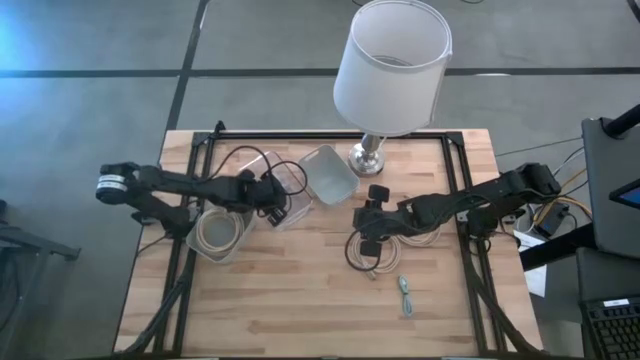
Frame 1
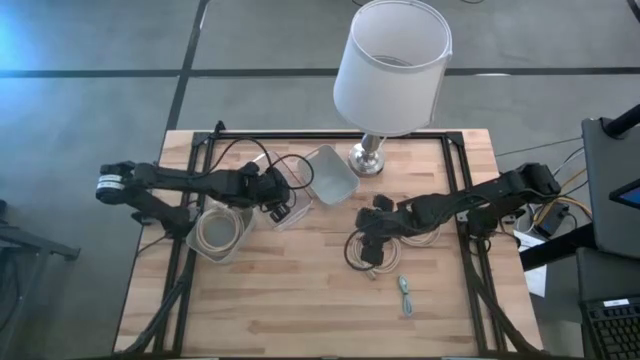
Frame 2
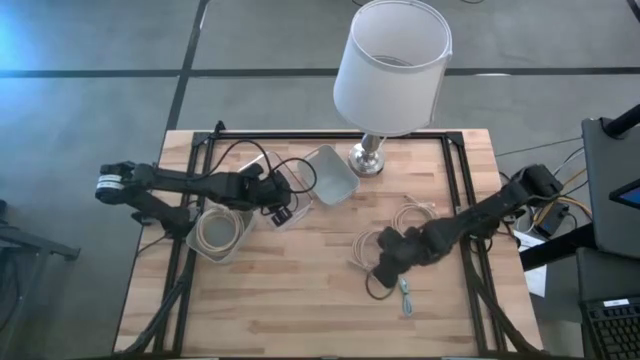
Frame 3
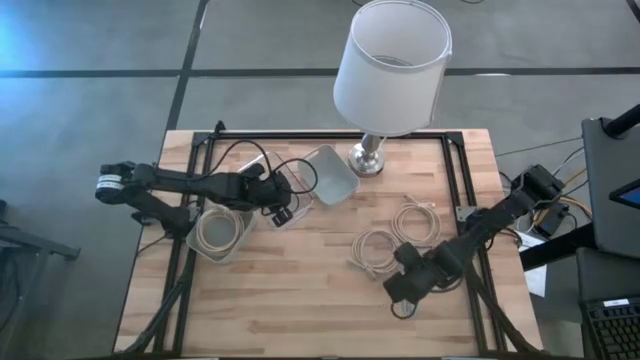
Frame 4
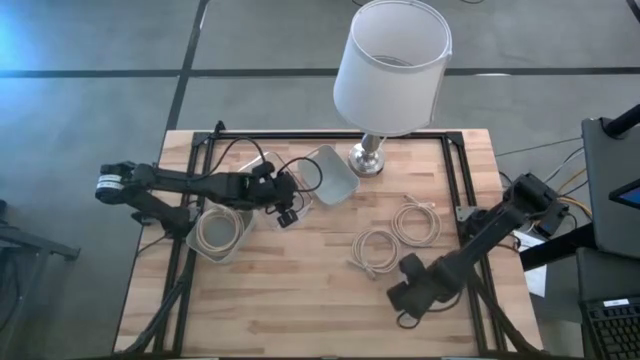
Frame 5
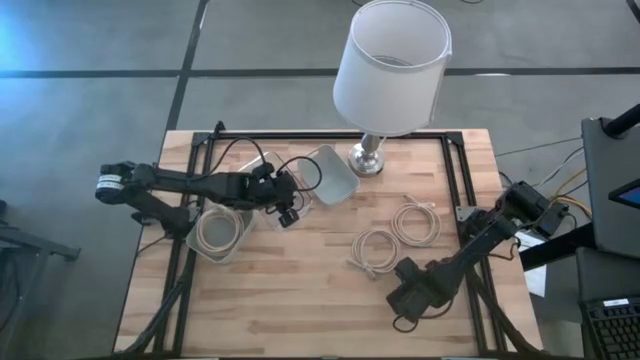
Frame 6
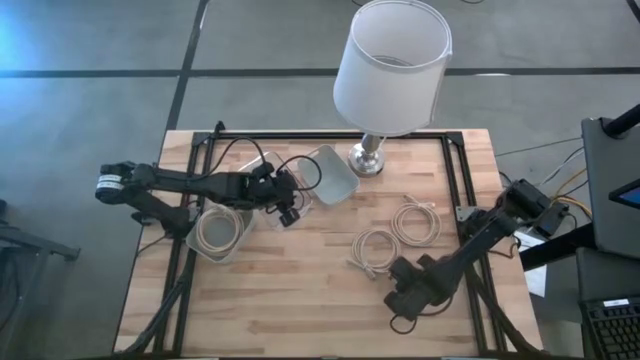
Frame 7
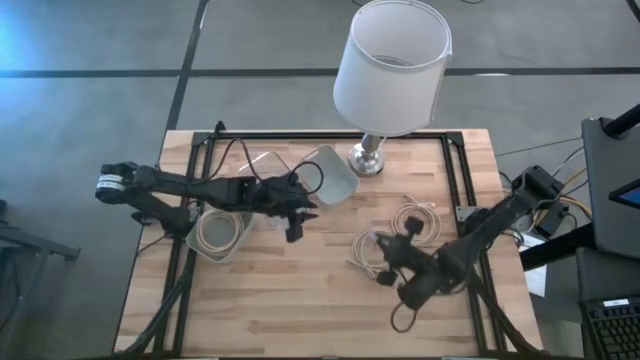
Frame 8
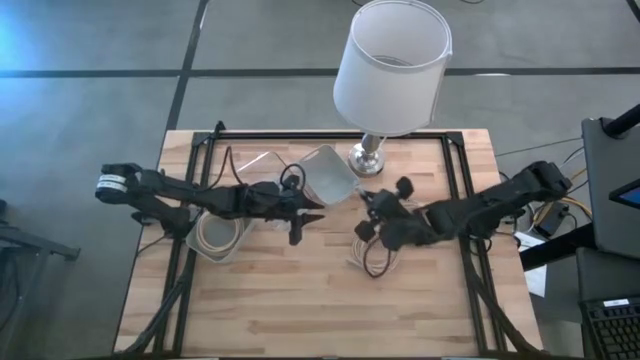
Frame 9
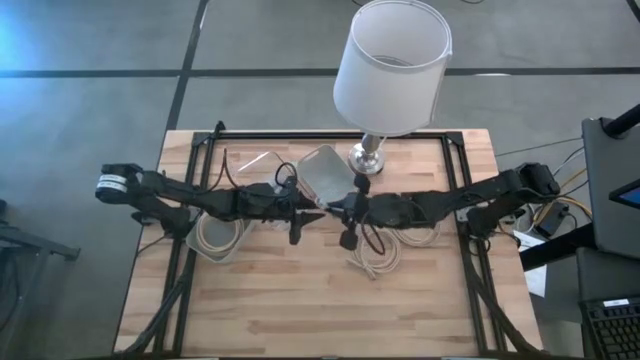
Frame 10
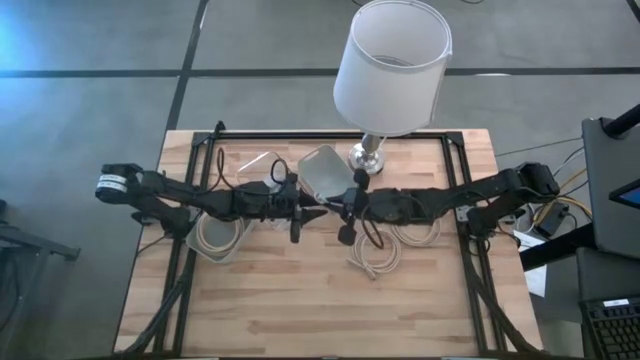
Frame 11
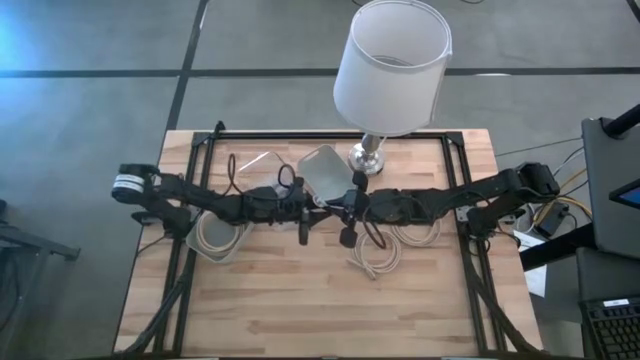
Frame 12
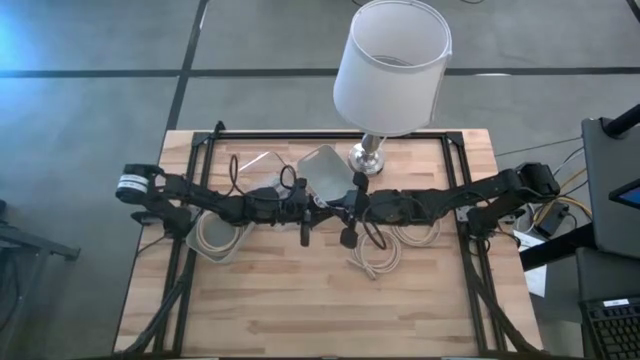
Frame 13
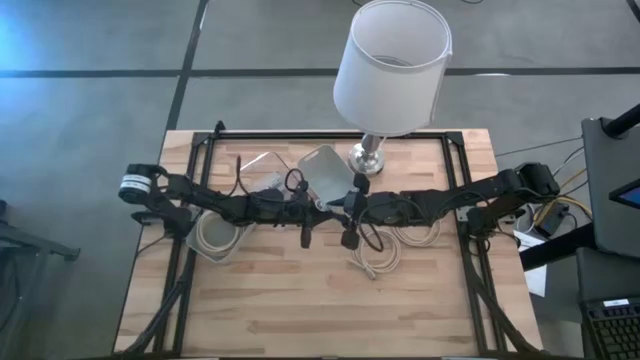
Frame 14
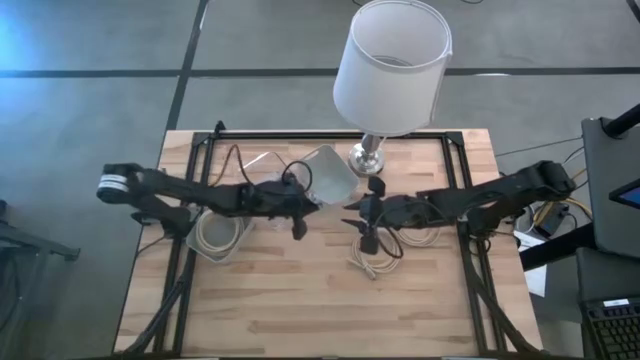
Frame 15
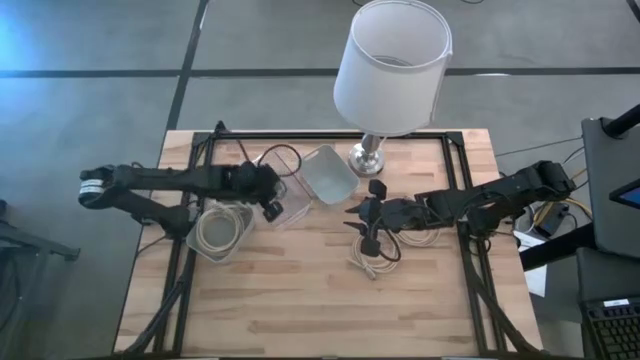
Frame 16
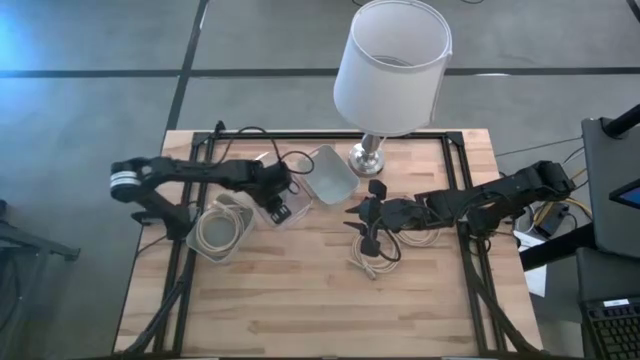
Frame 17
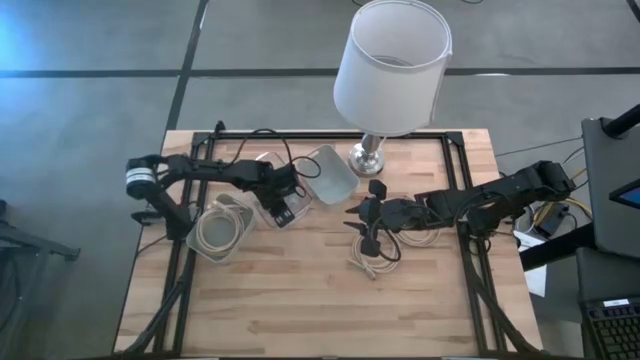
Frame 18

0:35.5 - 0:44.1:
Task: Pick & Place USB Port
Put the blue charger cable into the transparent bin

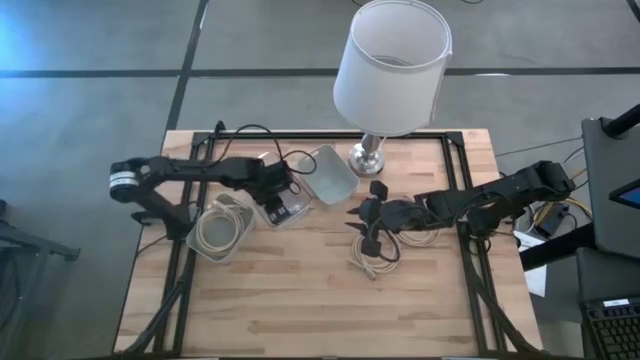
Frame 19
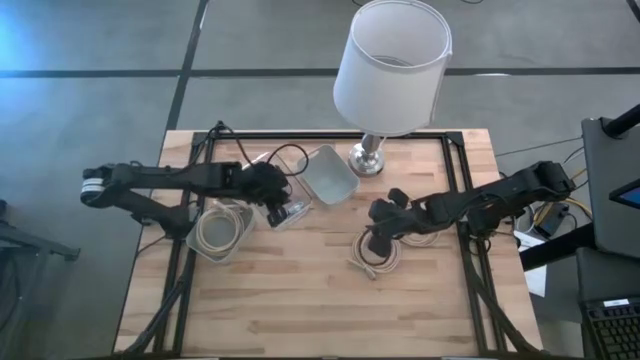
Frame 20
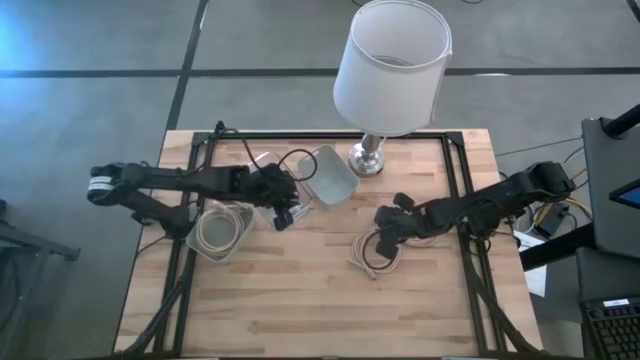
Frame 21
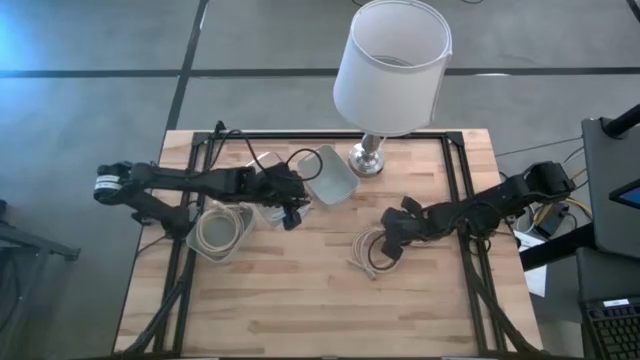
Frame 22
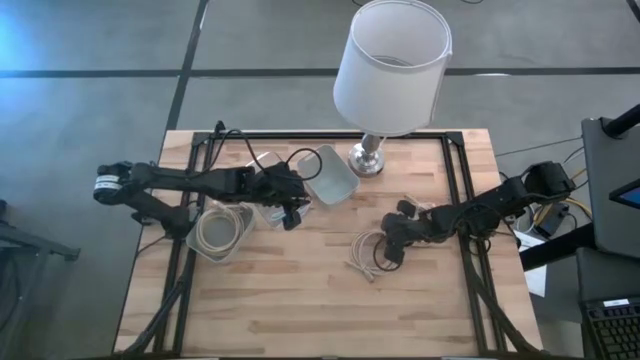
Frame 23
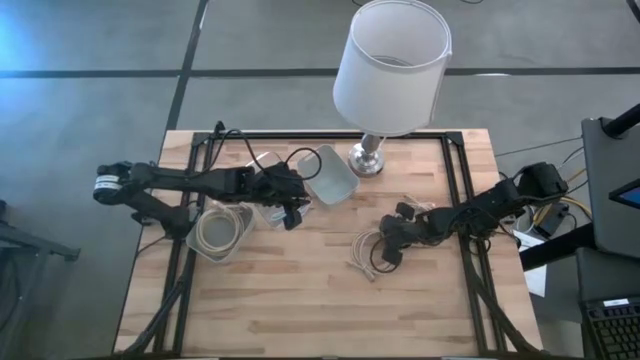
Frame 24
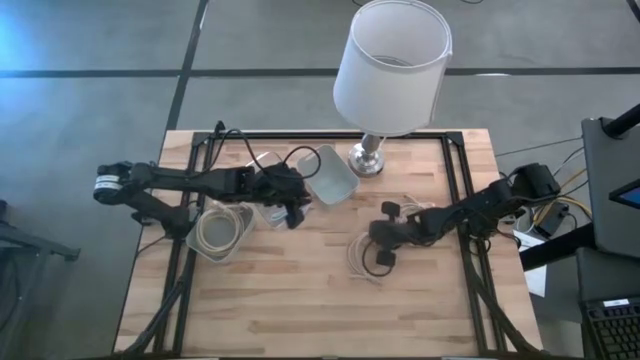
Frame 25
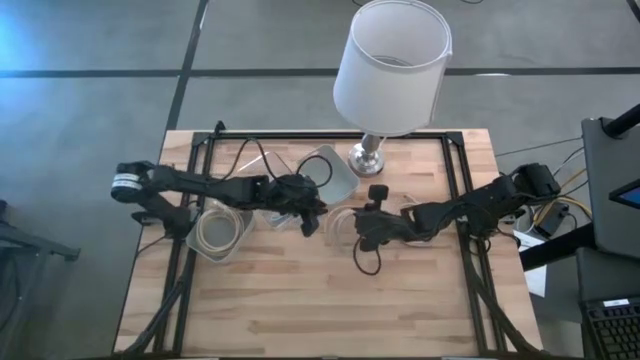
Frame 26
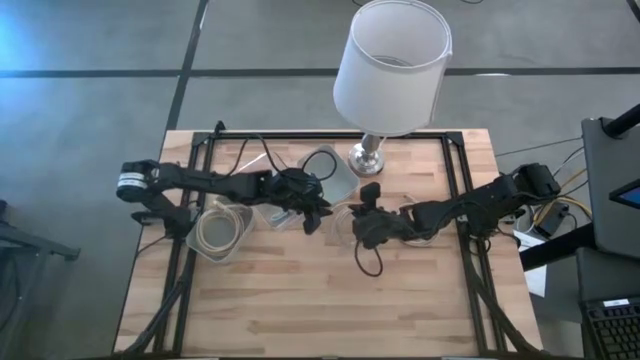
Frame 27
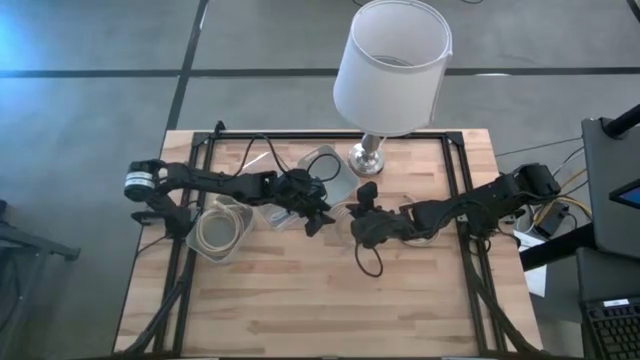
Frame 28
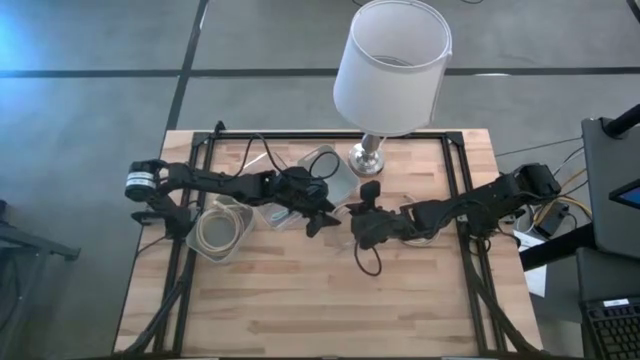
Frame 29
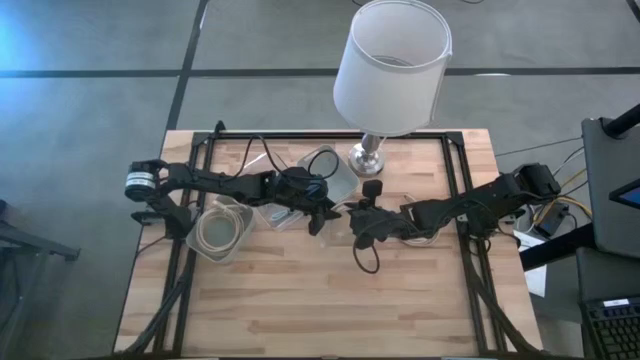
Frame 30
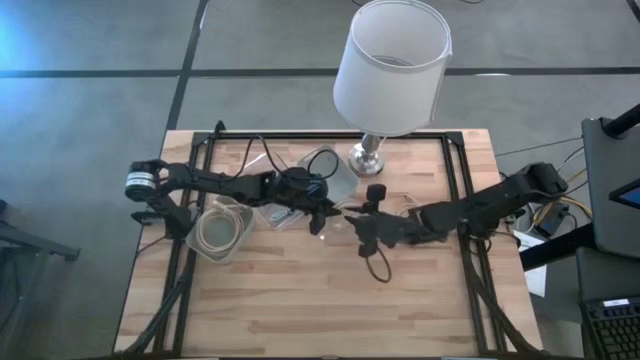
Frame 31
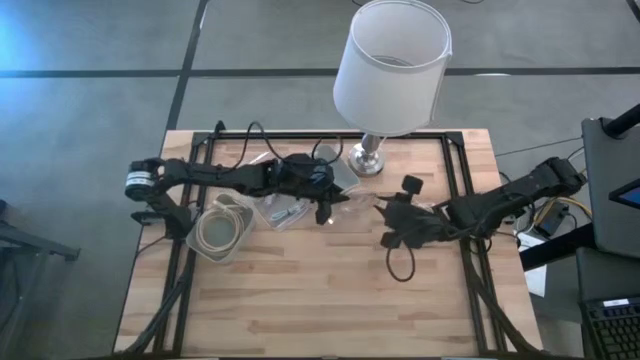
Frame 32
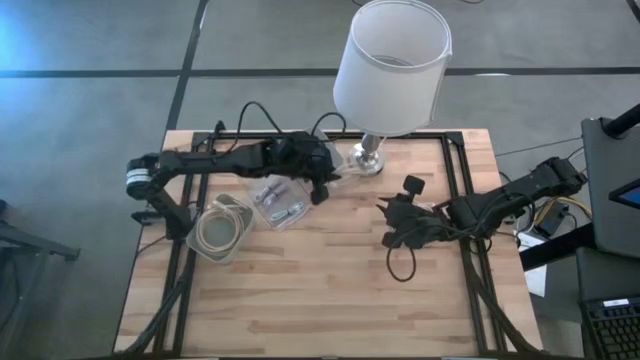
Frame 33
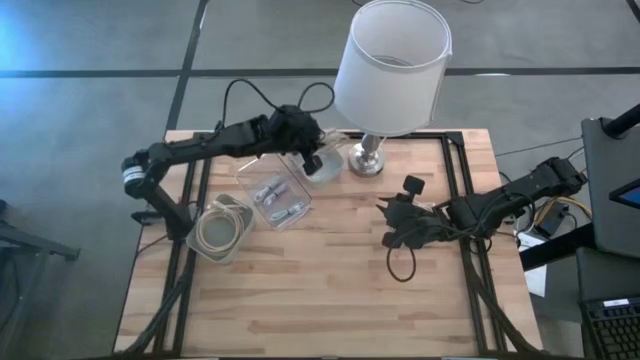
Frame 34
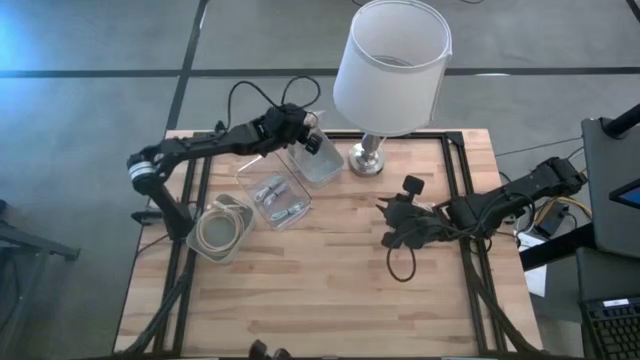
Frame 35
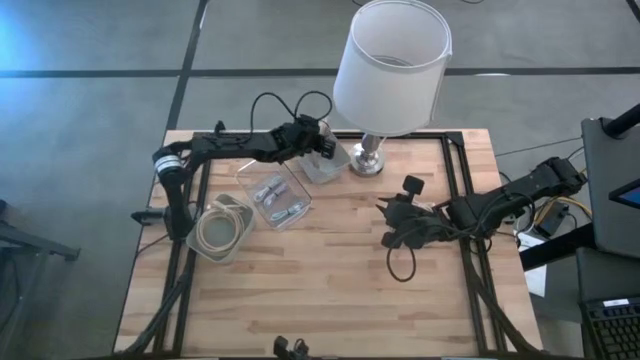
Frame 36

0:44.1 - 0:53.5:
Put the brown hdmi cable into the right gray bin

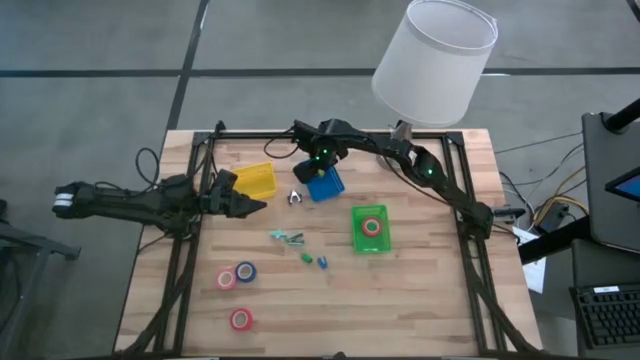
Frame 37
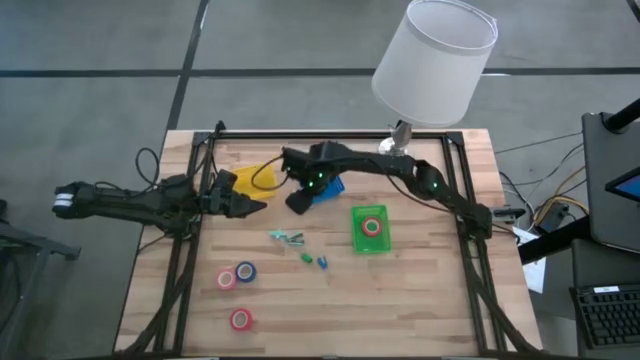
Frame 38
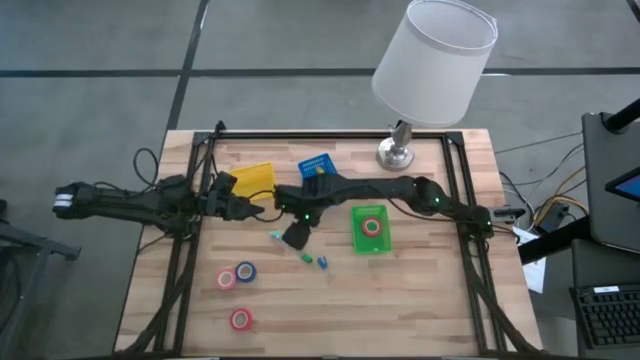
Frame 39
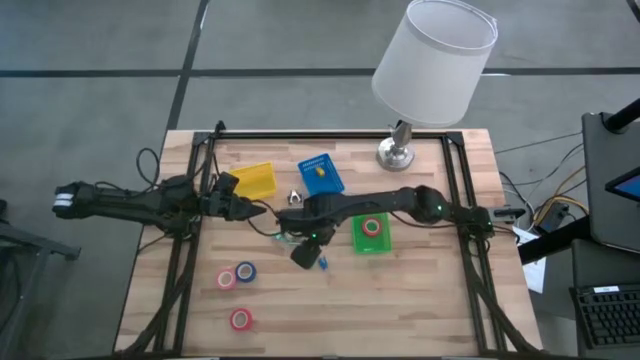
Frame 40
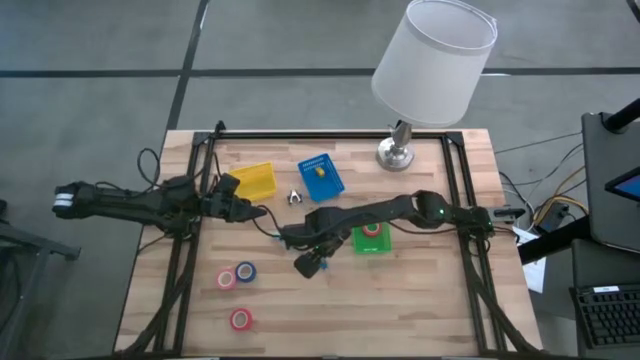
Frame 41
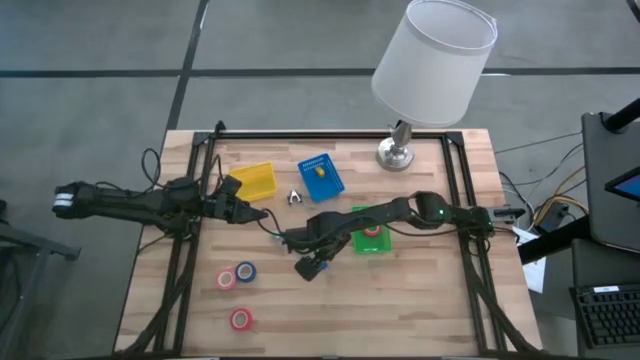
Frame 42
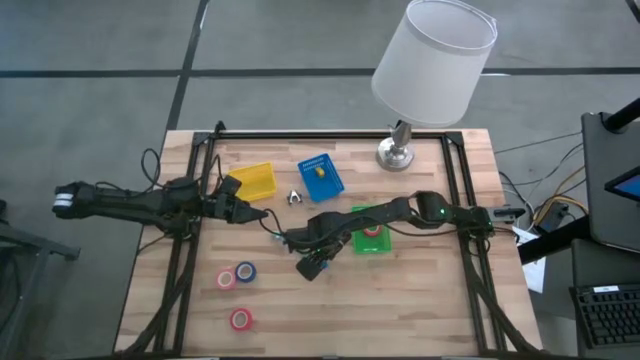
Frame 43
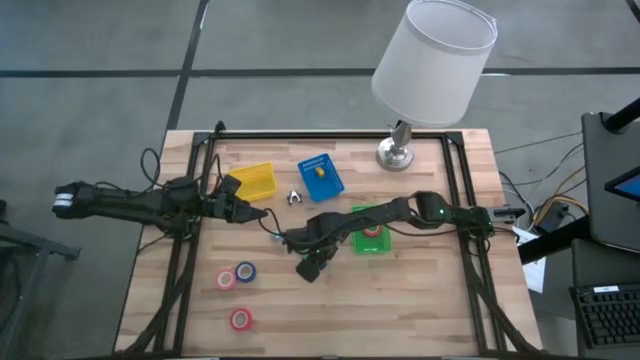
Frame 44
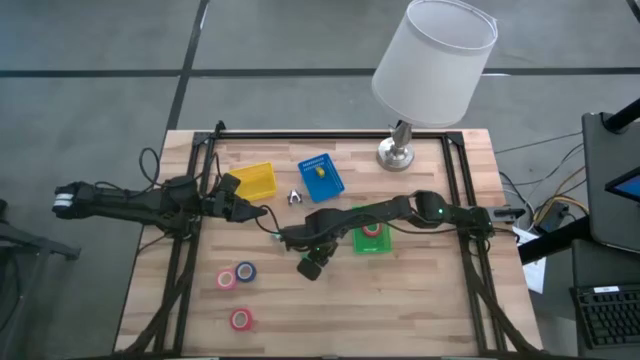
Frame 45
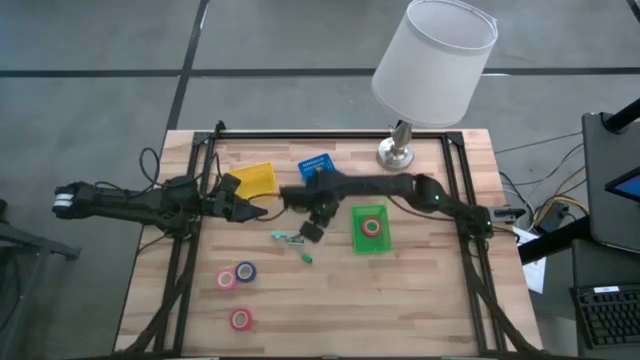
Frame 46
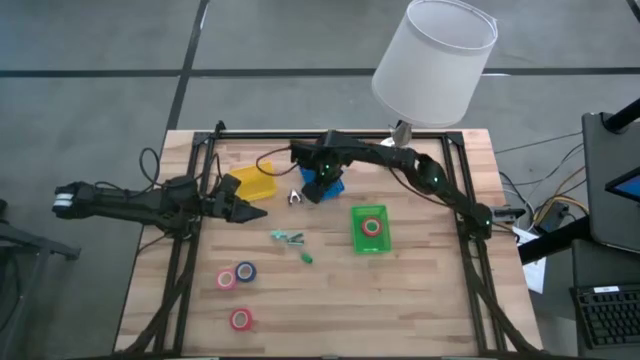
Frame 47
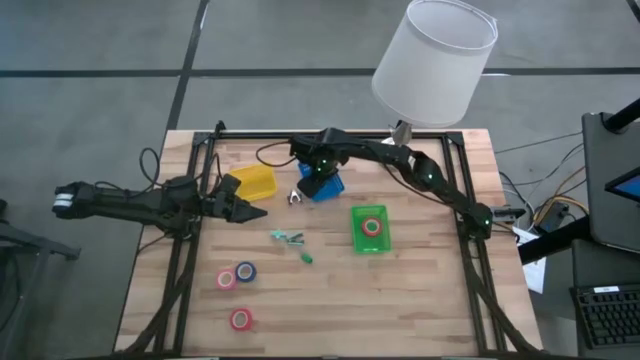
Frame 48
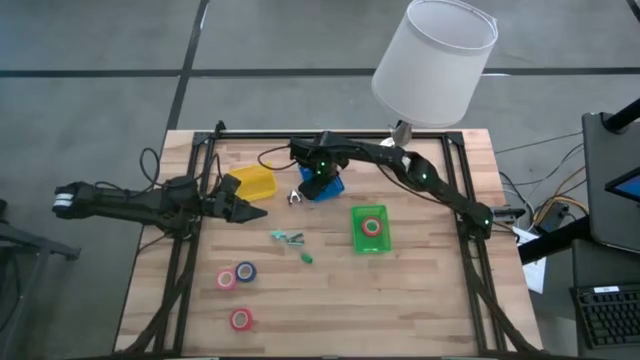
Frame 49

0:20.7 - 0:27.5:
Task: Pick and place Stapler, Stapler remover, tape
Put the blue stapler into the blue bin
